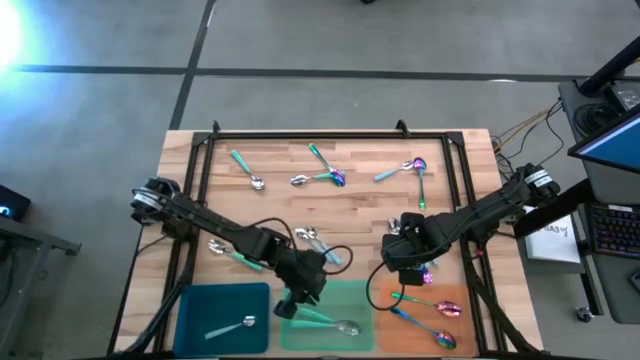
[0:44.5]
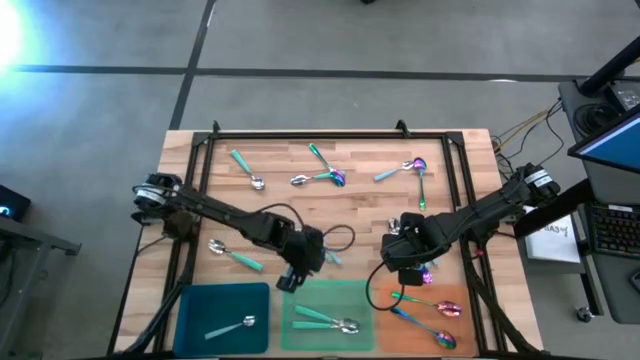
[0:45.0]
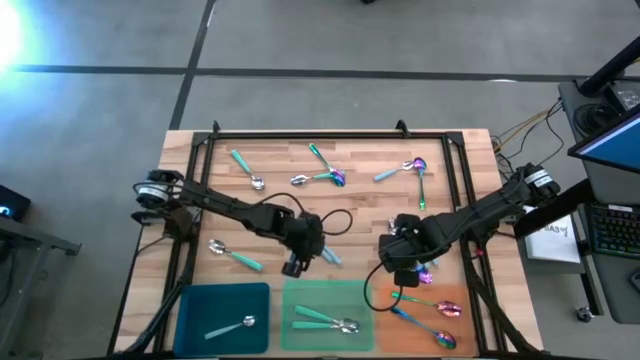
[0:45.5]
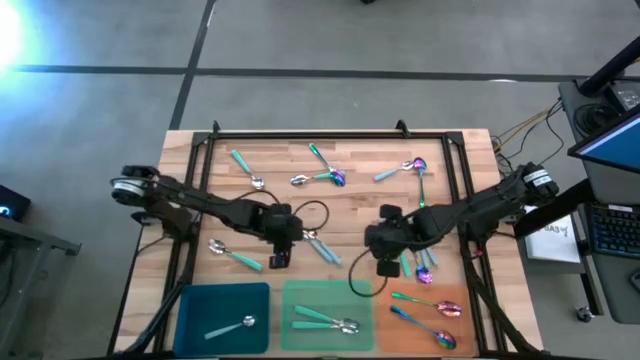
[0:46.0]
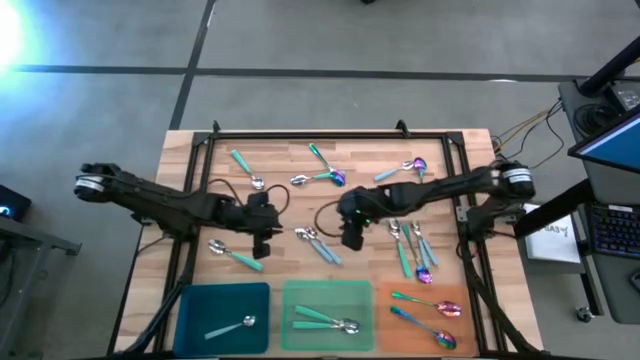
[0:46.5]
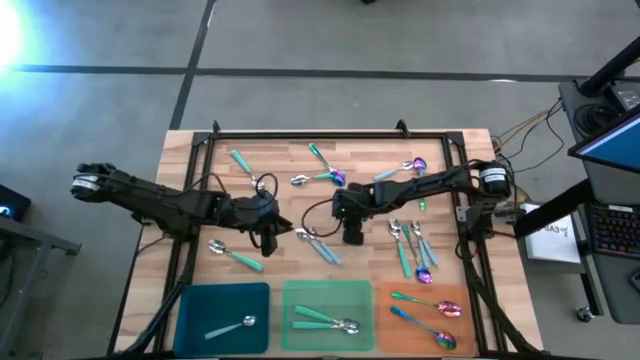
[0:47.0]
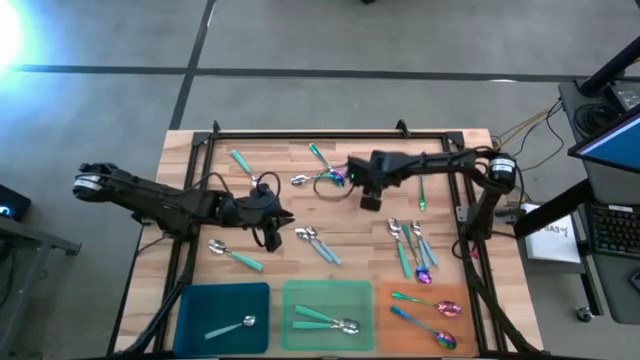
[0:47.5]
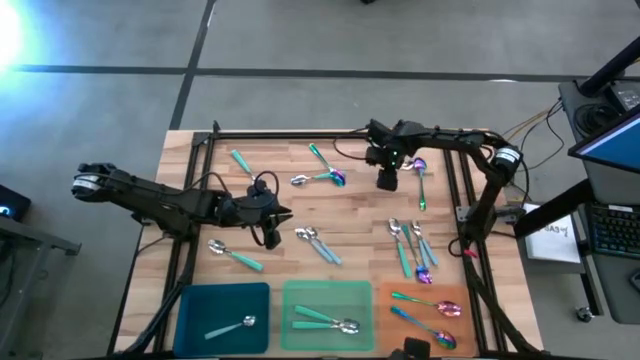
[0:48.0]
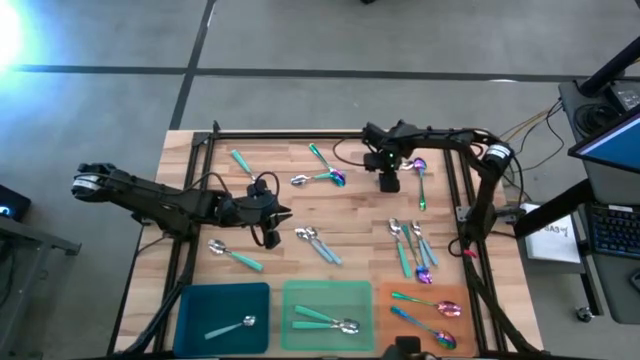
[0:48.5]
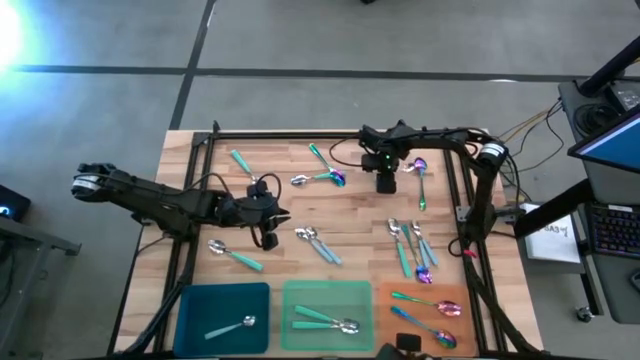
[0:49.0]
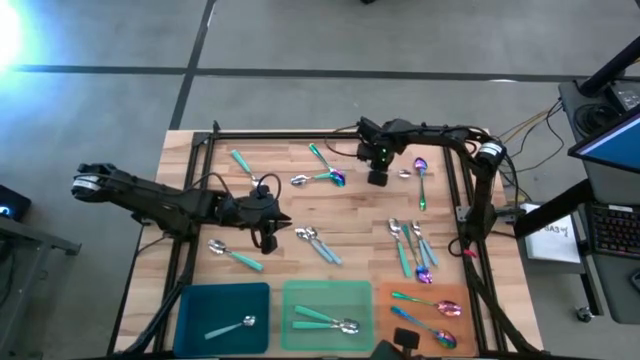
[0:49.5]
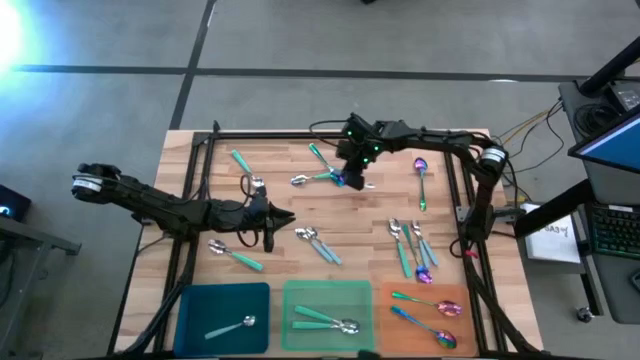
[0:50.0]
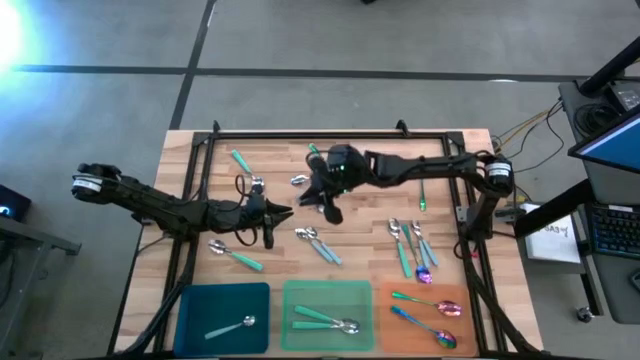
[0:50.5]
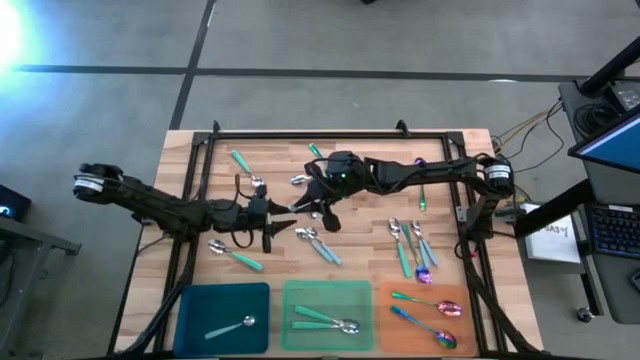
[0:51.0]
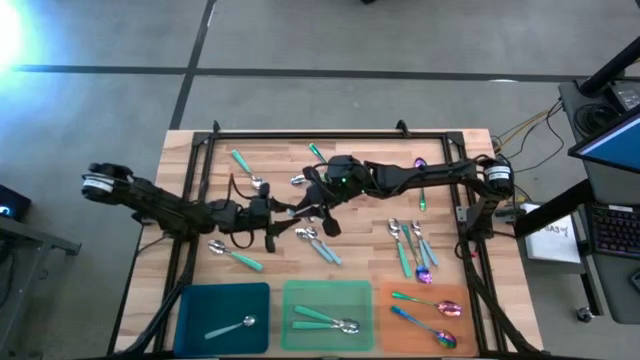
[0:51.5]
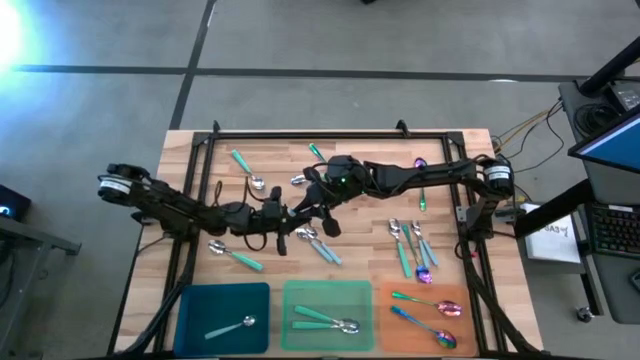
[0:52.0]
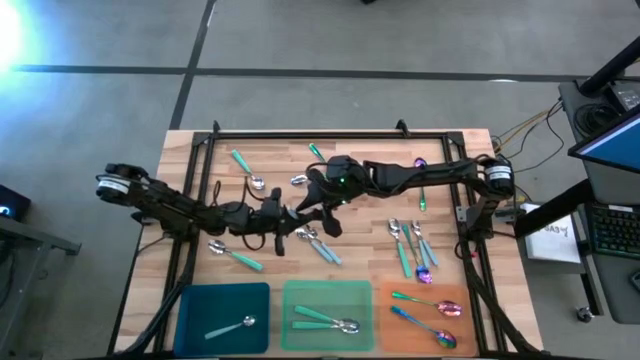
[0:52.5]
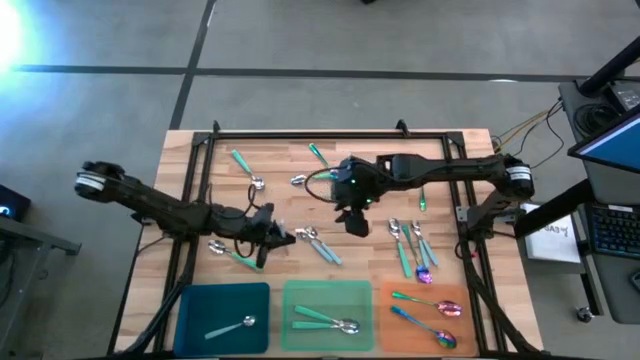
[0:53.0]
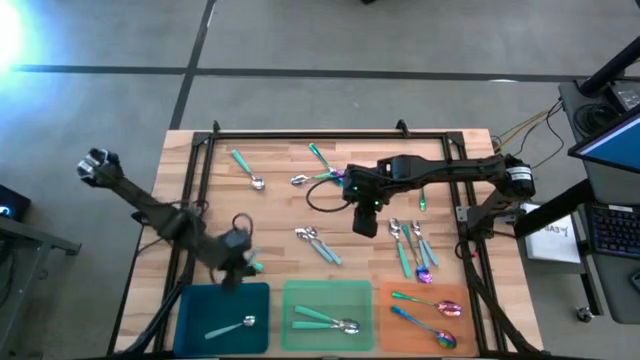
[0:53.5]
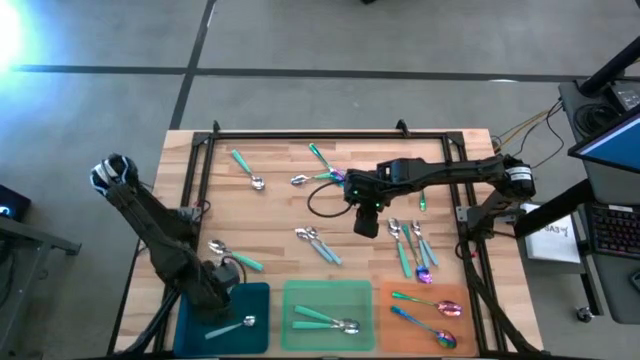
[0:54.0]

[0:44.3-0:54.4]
Task: Sort silverware by color (type)
Put the light blue spoon into the blue bin

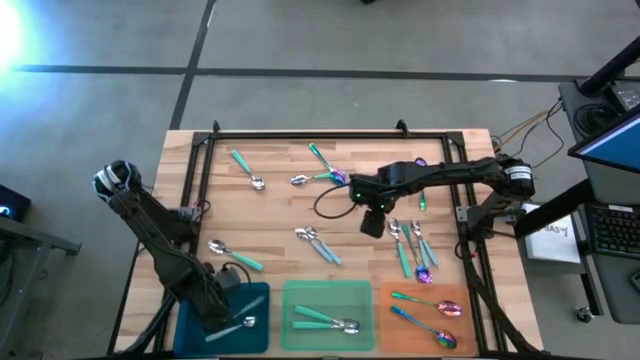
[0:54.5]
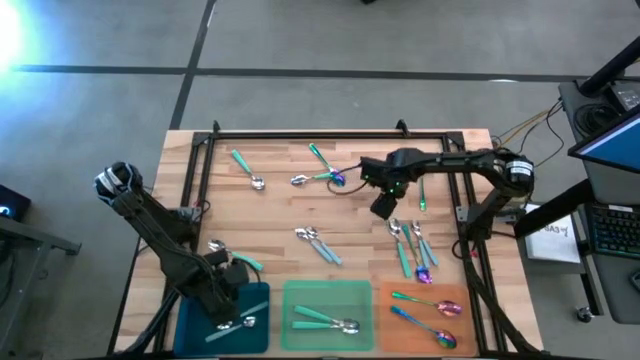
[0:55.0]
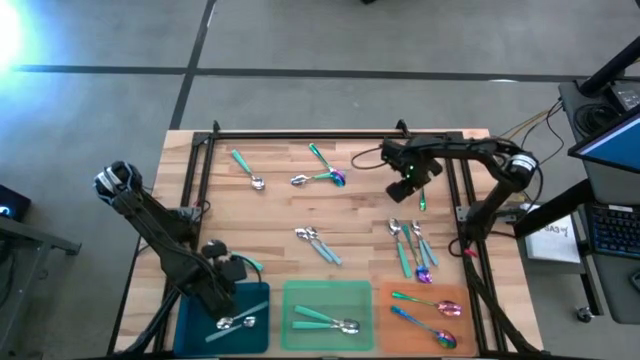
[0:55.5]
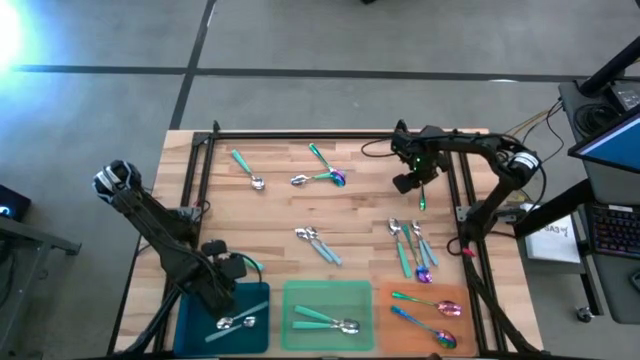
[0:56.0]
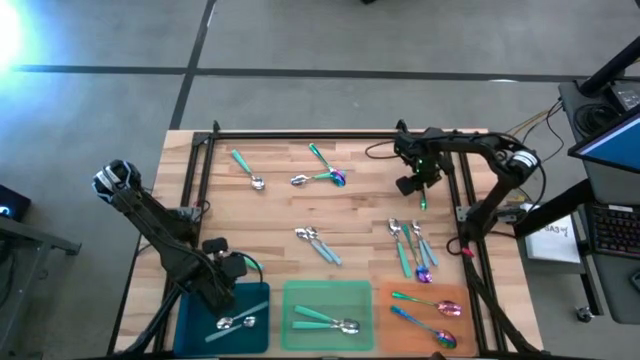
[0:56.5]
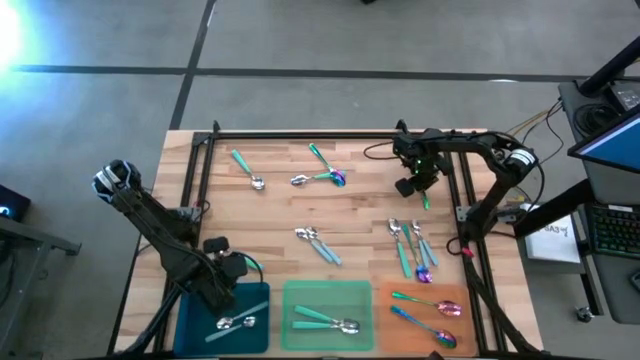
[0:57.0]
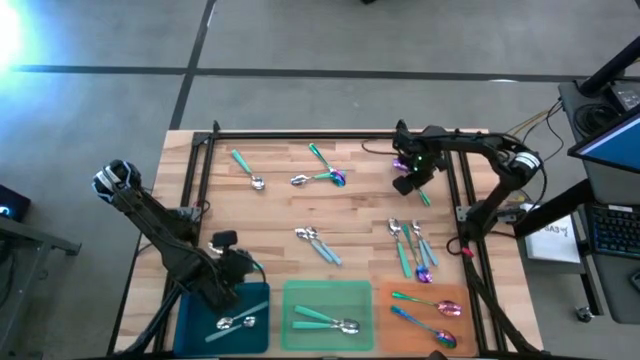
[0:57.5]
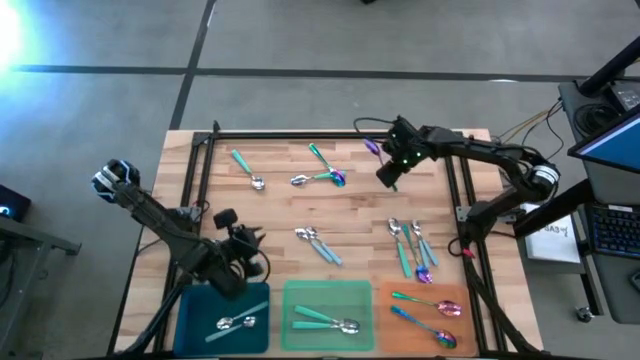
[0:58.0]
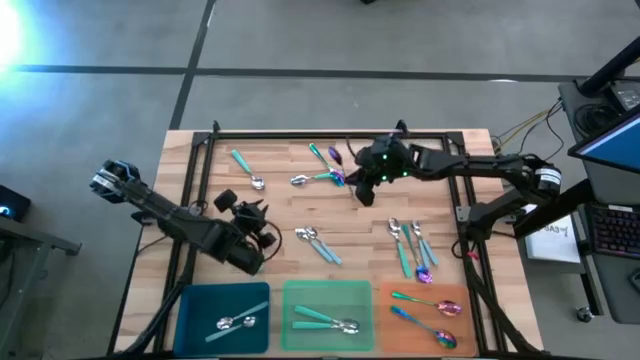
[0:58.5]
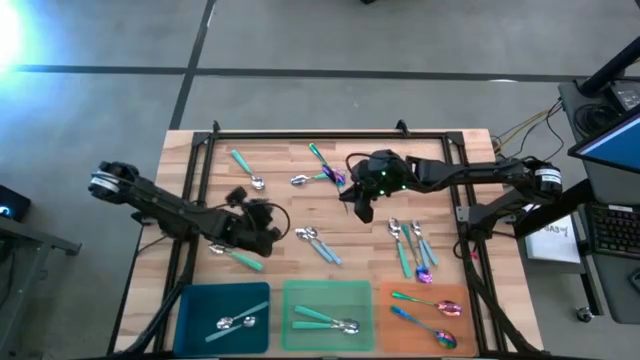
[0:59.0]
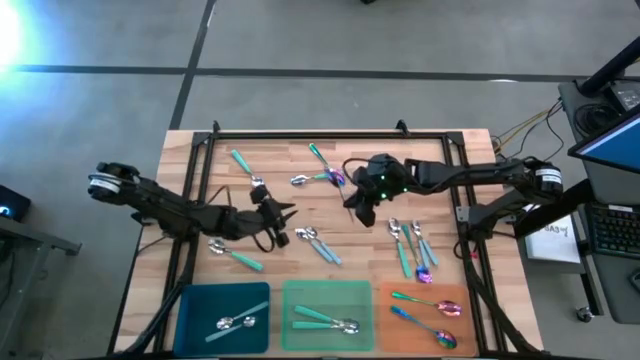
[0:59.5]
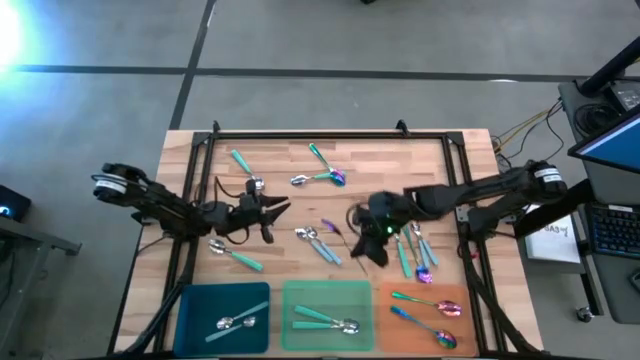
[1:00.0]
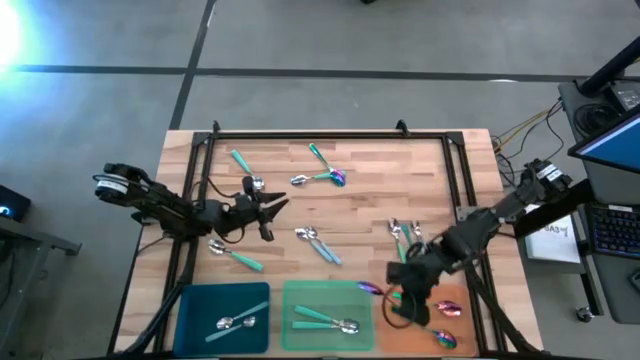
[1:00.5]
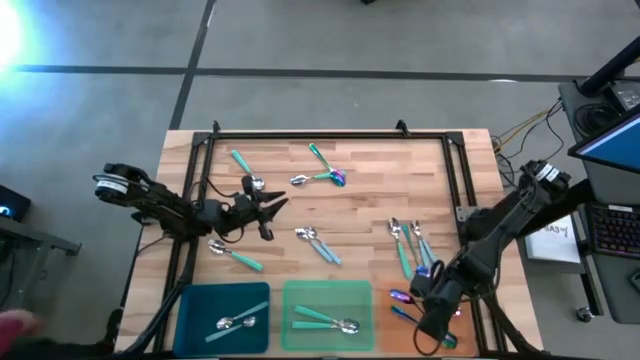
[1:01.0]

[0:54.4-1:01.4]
Put the blue spoon into the orange bin
